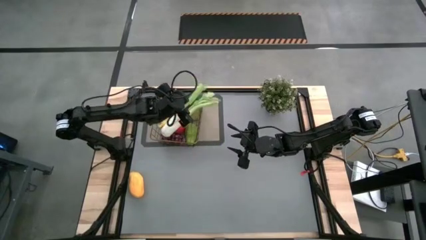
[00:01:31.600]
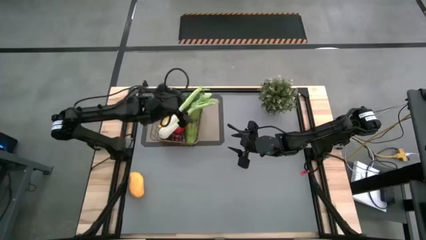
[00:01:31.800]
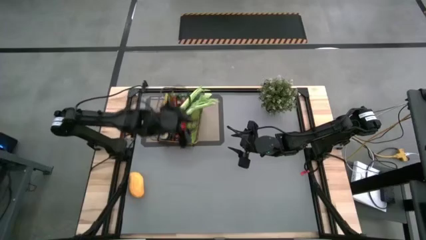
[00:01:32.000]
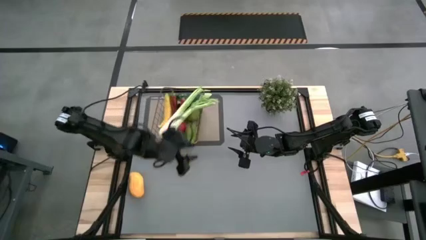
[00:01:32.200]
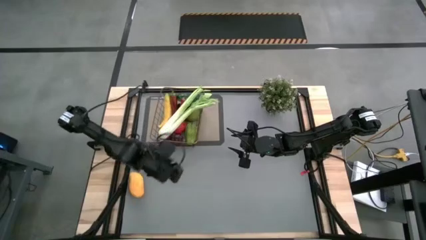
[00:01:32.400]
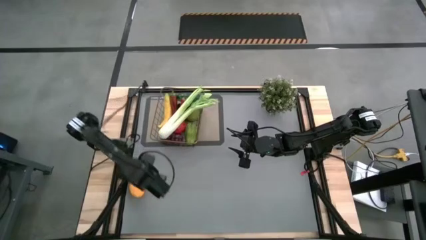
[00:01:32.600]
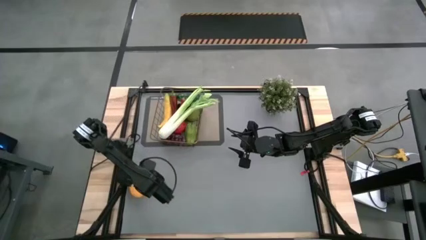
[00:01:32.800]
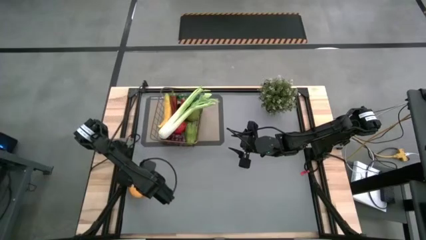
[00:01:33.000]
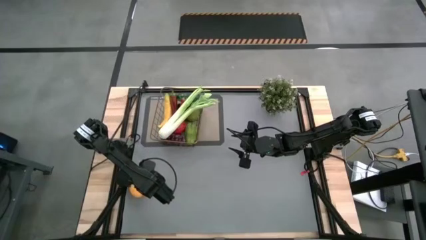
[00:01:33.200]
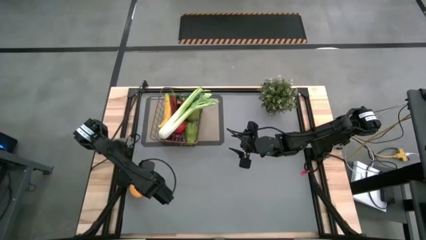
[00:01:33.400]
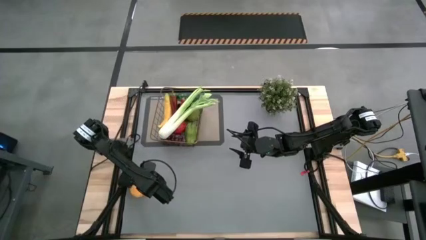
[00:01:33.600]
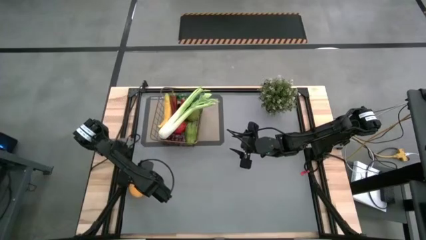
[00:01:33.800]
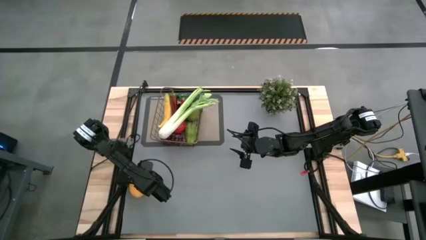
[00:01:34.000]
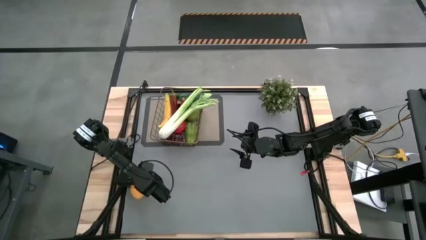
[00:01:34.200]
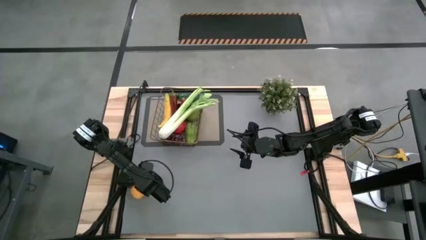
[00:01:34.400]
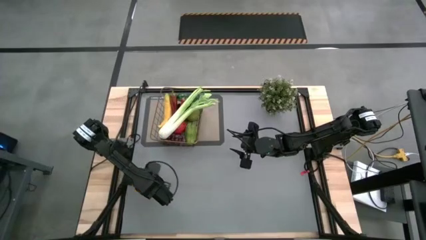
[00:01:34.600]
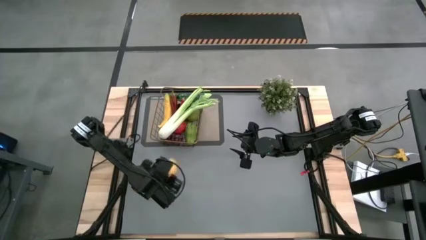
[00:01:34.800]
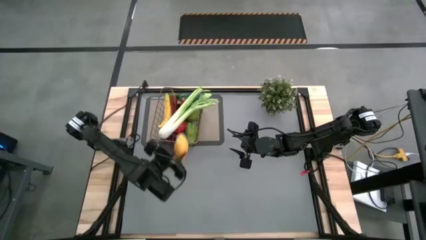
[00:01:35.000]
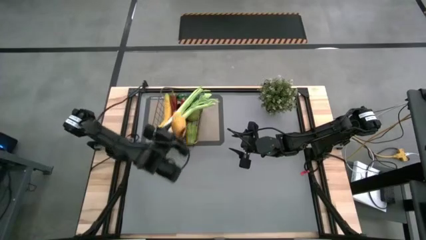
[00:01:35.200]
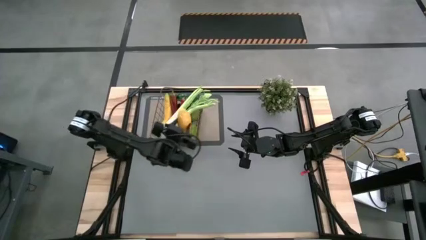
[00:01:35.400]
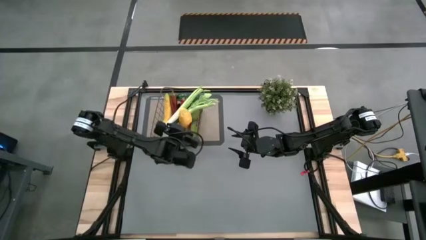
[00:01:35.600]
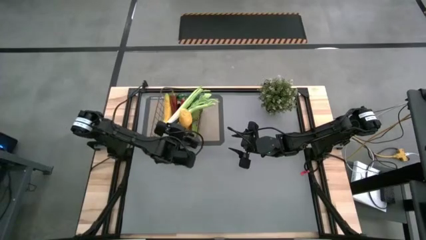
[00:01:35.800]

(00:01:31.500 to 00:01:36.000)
Task: Build produce basket
Put the mango into the wire basket

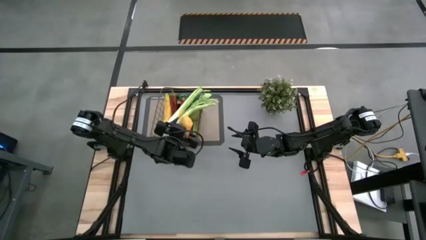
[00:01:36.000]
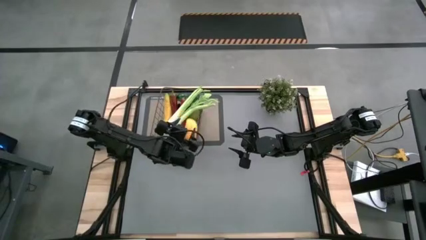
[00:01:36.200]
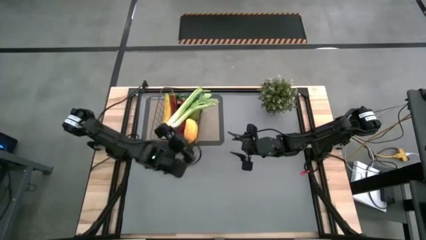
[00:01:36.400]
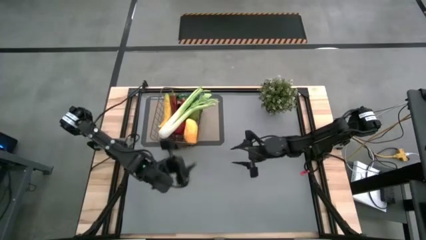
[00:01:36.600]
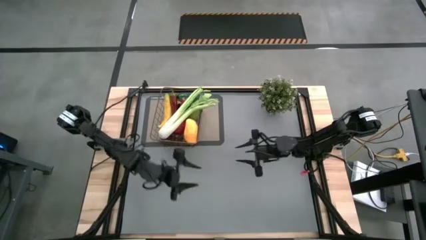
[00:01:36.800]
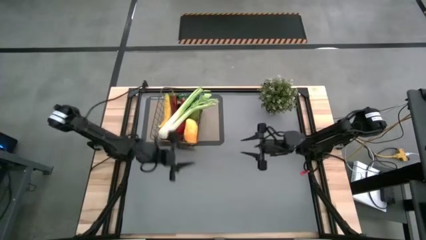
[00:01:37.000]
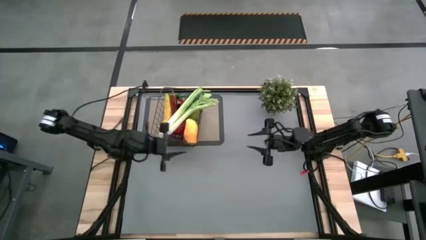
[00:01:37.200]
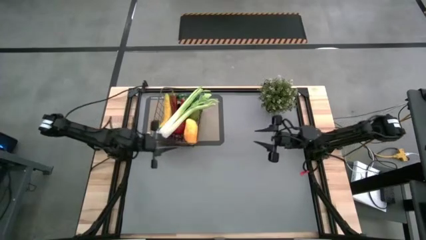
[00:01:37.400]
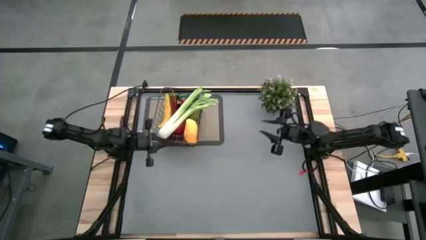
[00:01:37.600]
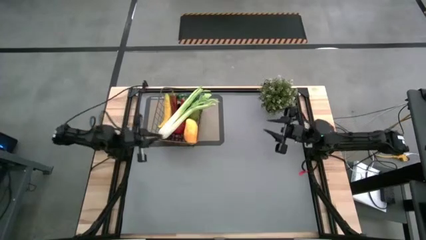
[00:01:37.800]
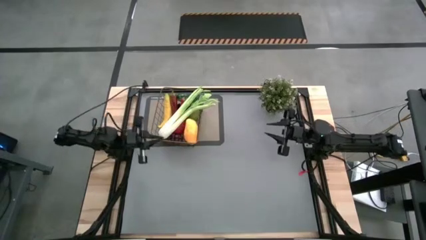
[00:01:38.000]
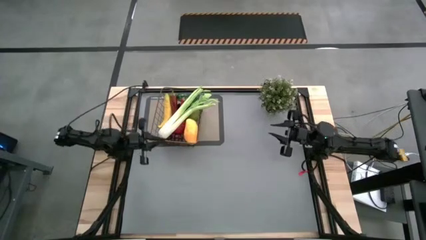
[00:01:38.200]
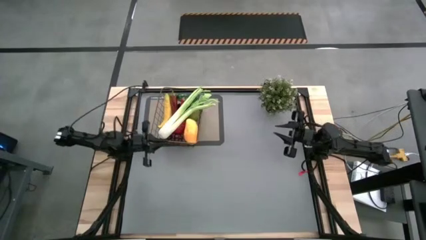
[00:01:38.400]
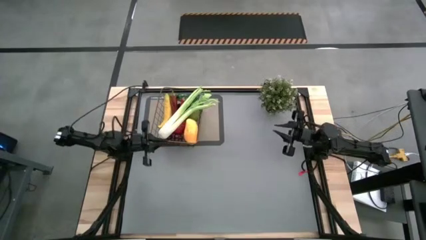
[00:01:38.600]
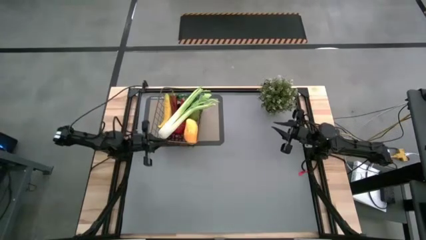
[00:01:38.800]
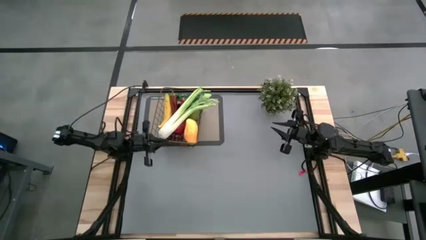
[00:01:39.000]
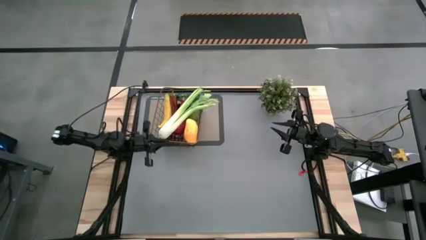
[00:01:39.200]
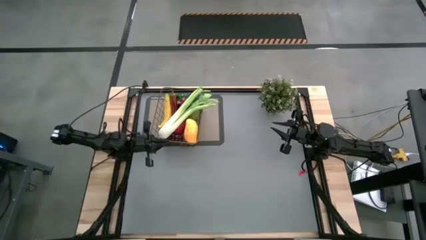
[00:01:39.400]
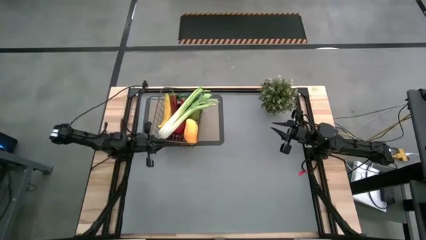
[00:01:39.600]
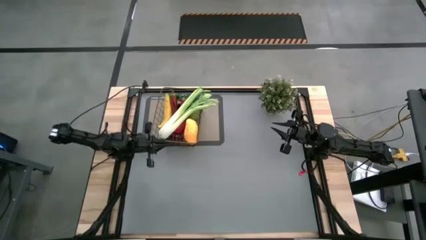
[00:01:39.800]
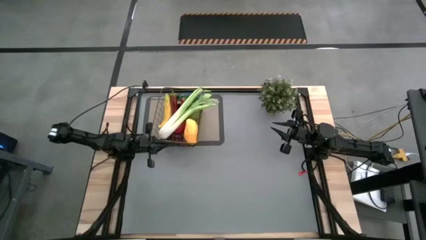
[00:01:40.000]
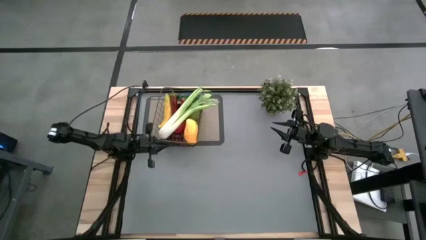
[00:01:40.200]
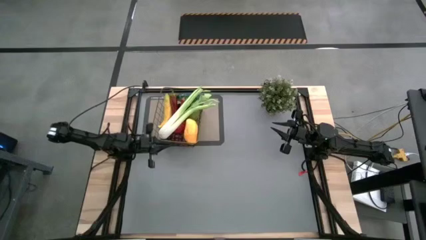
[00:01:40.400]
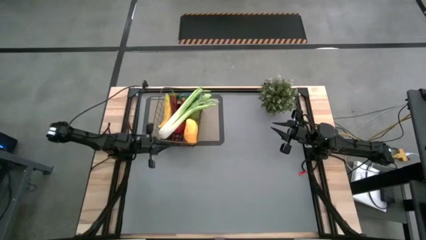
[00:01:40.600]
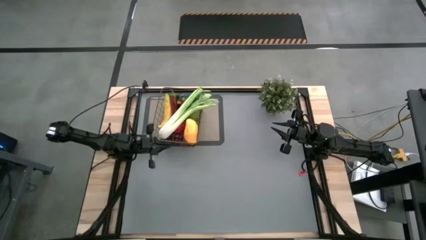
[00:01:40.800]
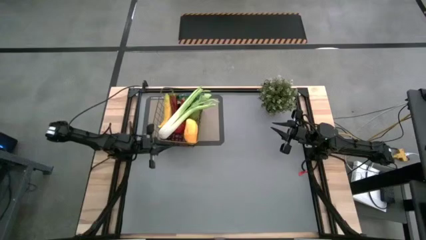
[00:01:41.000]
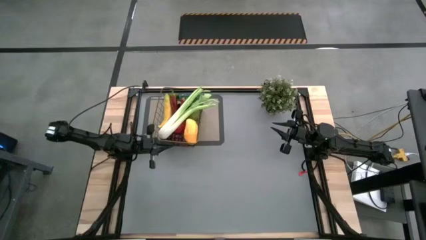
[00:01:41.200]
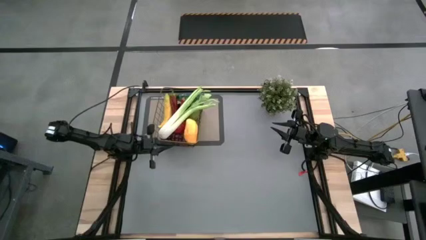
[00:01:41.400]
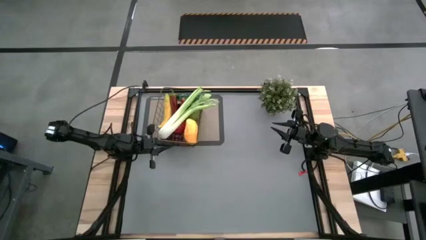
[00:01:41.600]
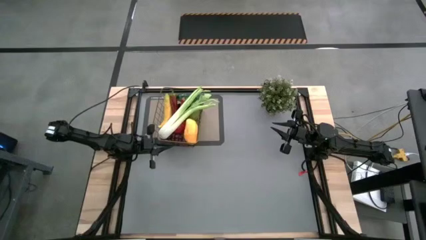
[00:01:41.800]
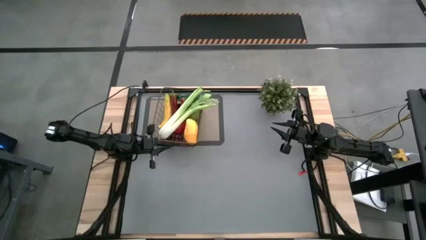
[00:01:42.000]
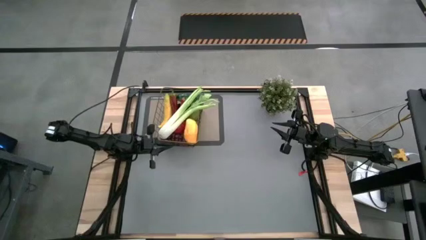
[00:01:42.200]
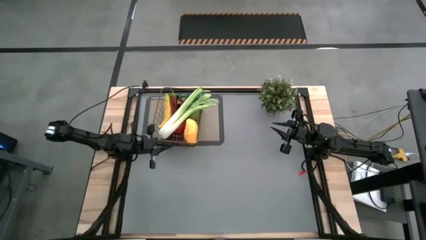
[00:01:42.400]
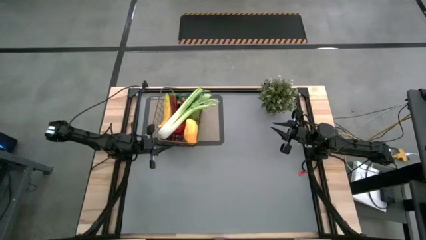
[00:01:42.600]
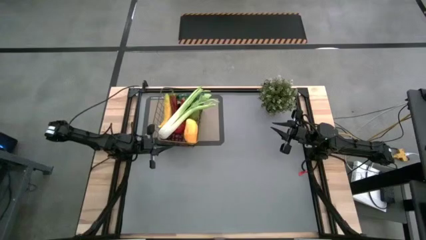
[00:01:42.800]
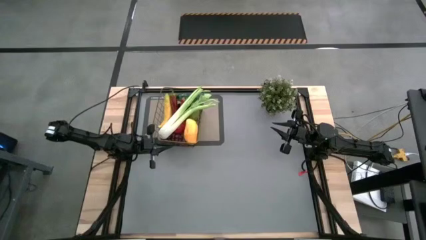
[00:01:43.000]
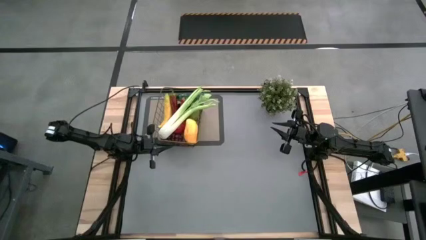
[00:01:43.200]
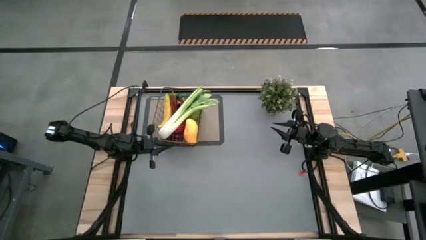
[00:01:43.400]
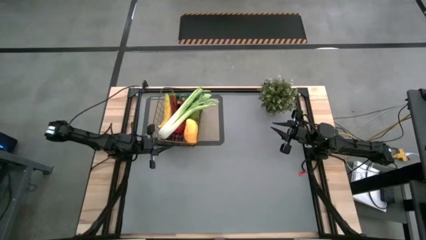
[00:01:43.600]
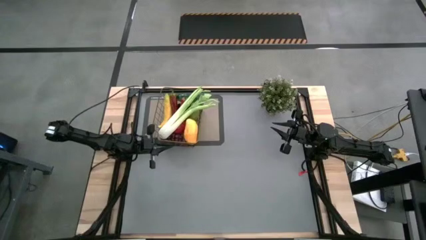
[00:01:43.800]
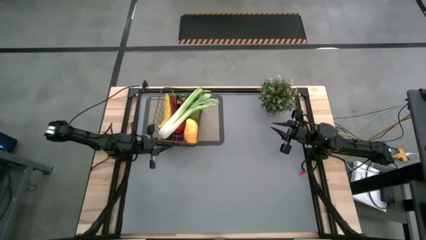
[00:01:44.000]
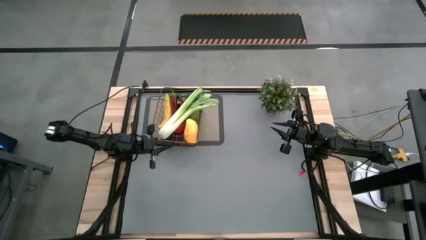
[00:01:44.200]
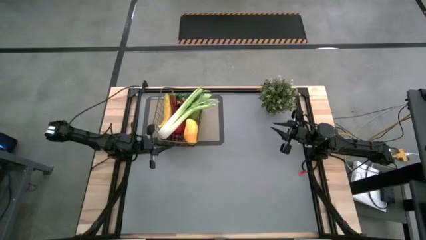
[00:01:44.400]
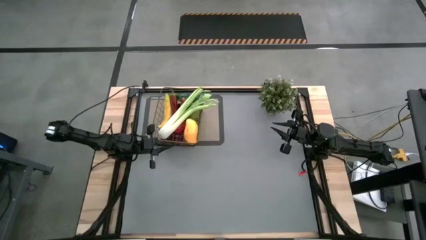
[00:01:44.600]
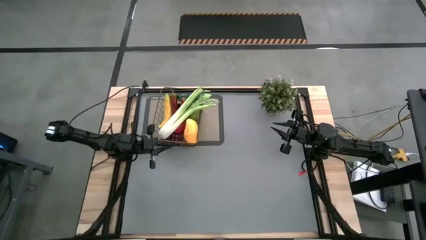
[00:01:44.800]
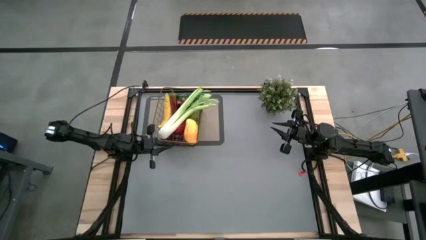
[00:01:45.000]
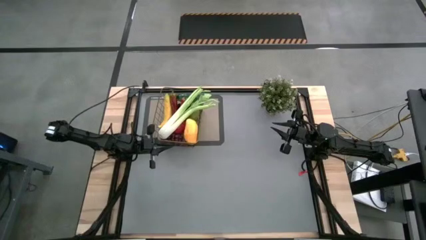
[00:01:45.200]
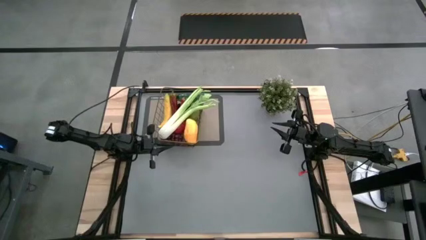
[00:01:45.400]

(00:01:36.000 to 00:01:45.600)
Return to Home Position

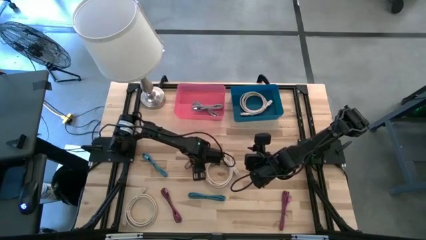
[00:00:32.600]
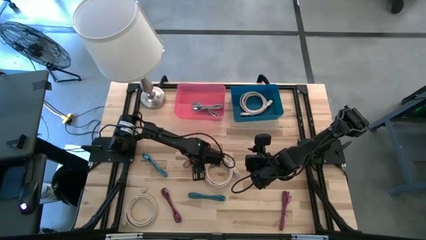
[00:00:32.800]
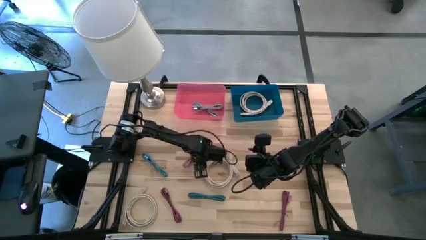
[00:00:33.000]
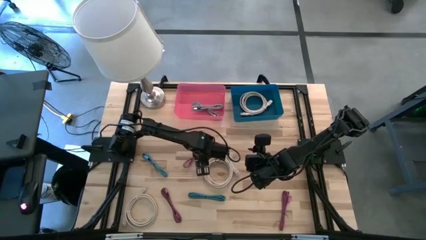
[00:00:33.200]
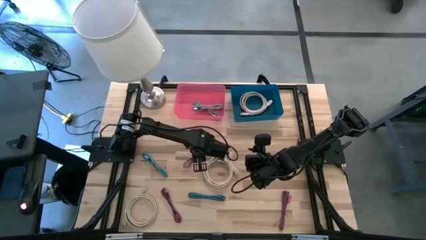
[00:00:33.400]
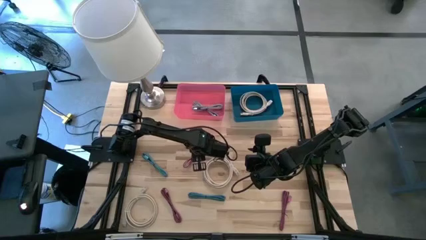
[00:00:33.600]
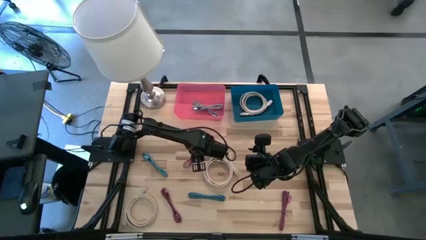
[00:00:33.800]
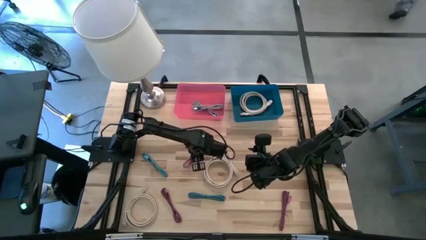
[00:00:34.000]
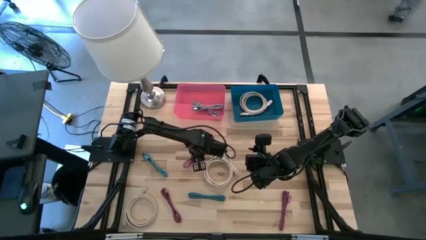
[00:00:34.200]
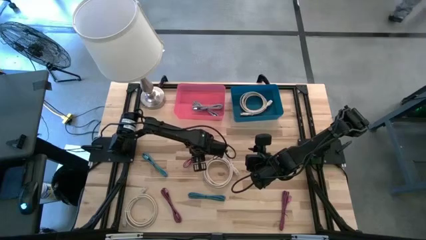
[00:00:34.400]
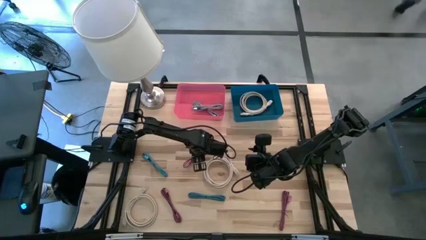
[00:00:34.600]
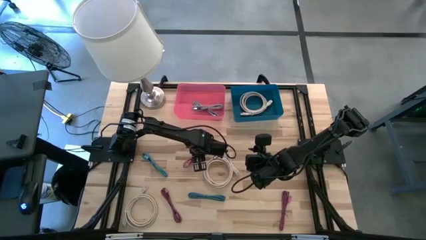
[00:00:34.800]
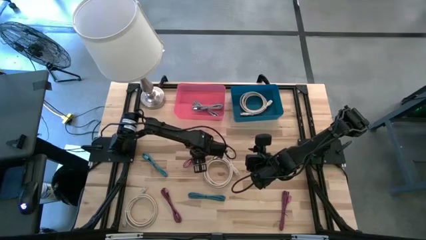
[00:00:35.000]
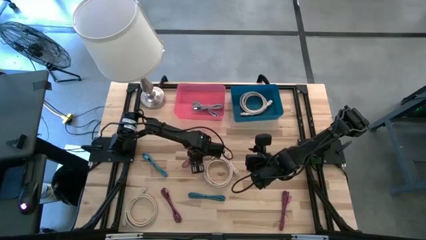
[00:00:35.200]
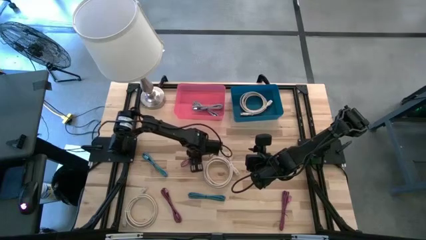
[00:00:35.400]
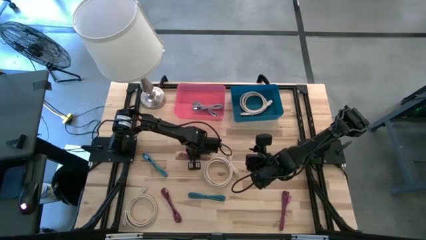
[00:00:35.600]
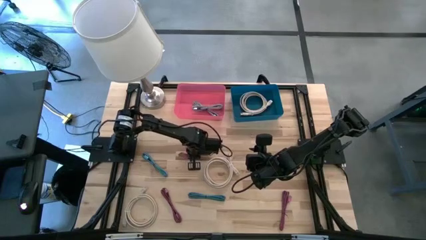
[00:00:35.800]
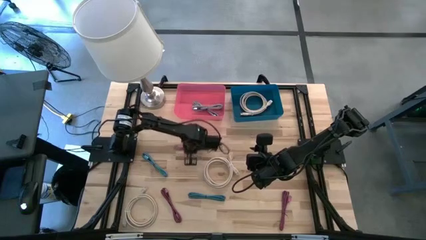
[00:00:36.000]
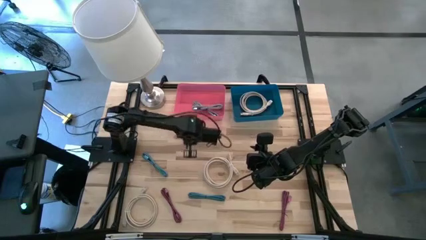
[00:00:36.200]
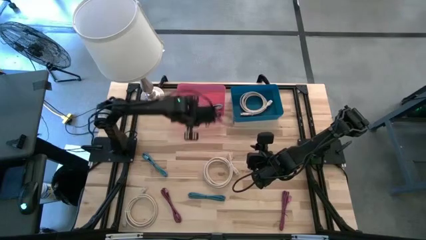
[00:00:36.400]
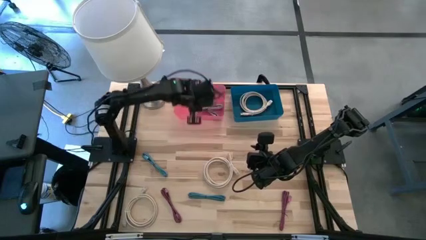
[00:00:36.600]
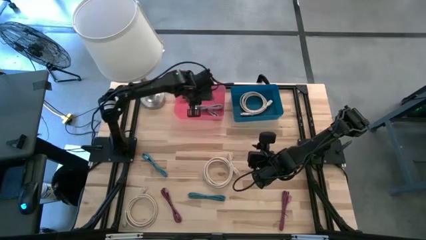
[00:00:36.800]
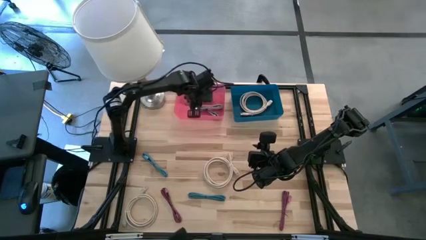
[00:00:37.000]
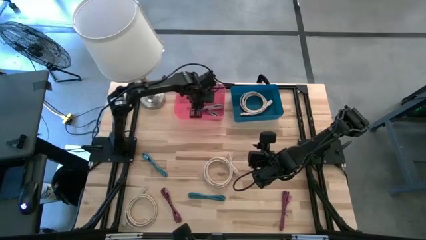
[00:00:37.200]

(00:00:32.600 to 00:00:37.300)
Task: Pick & Place USB Port
Put the top black and pink charger cable into the red bin
